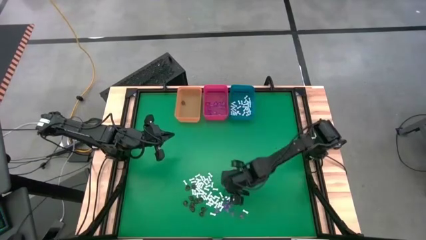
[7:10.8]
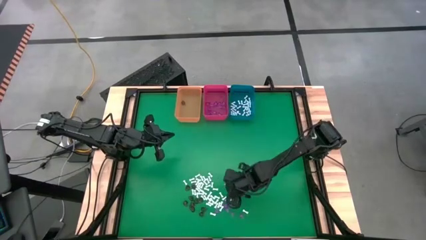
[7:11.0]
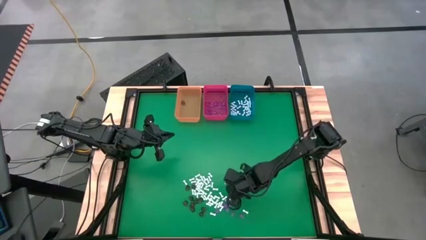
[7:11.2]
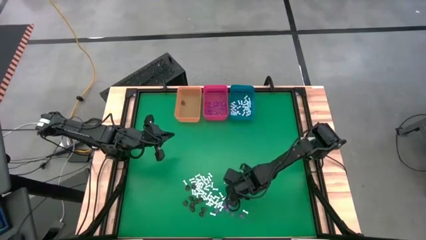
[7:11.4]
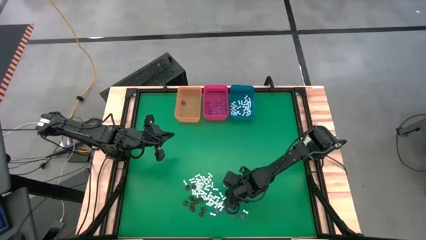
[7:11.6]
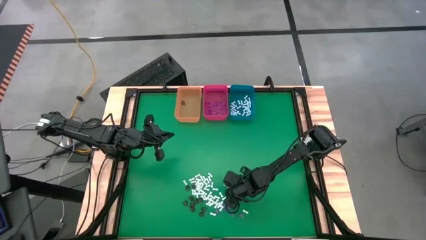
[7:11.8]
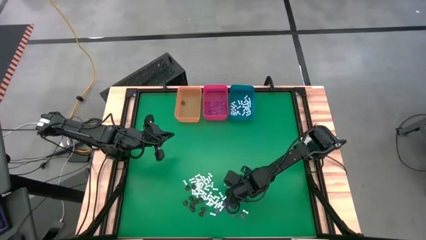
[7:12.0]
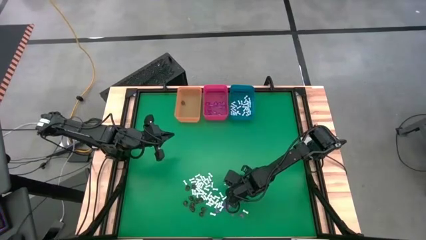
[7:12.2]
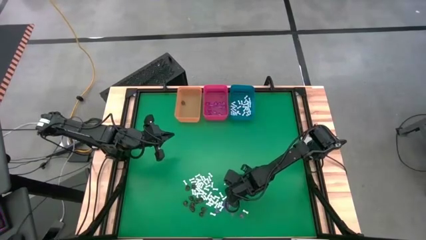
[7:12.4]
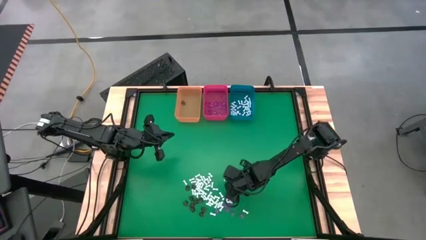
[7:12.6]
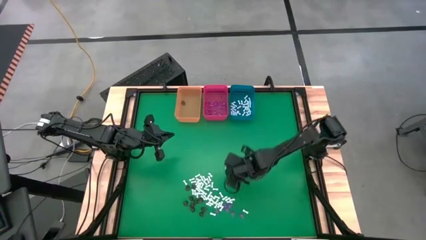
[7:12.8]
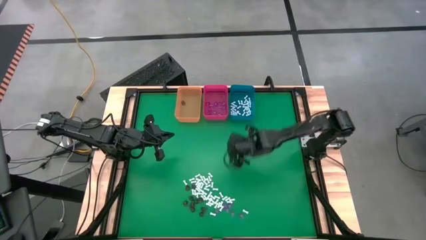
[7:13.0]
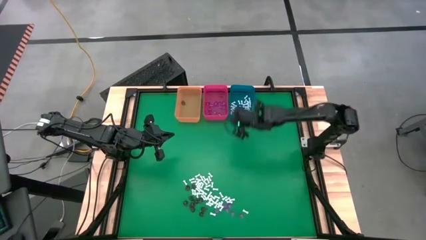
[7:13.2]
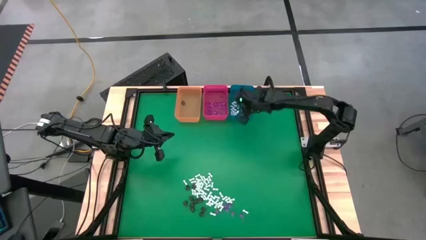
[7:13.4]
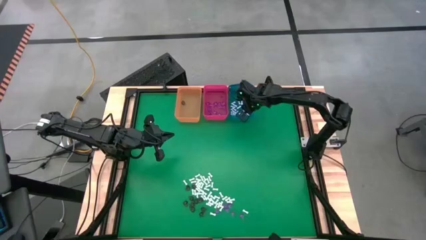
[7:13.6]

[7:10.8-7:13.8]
Task: Sort Halloween decoration
Put the white bone toy into the blue bin

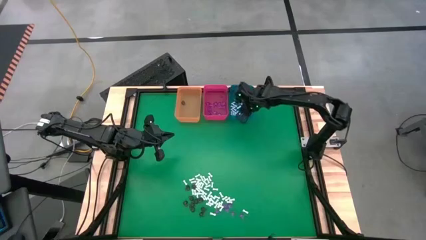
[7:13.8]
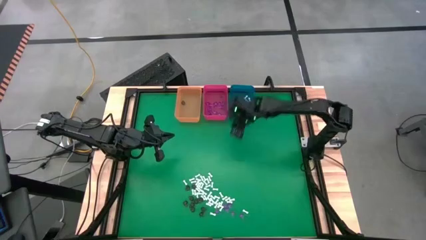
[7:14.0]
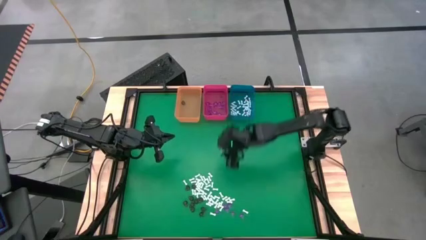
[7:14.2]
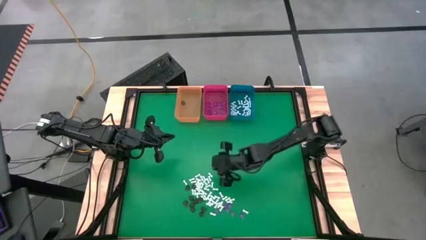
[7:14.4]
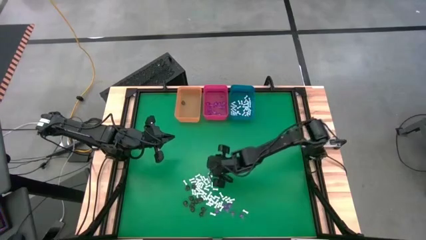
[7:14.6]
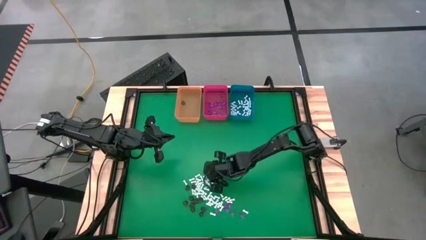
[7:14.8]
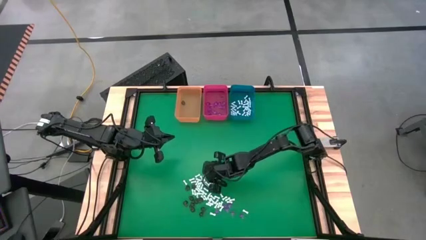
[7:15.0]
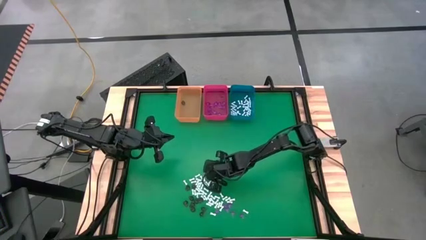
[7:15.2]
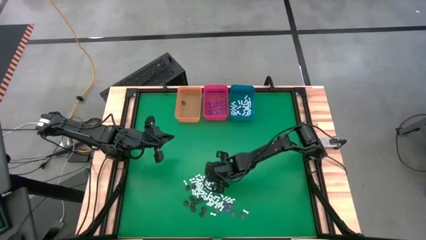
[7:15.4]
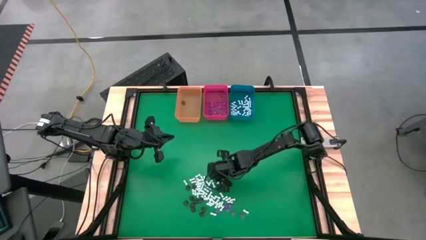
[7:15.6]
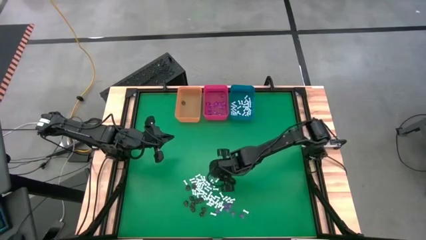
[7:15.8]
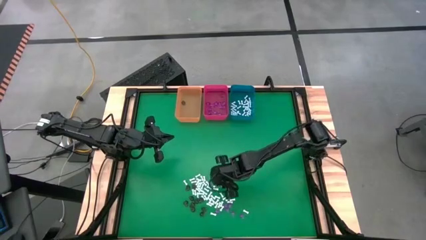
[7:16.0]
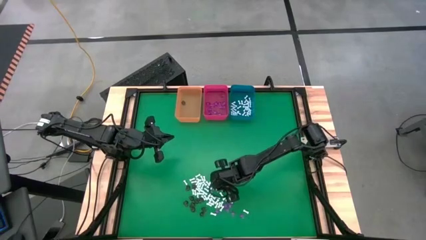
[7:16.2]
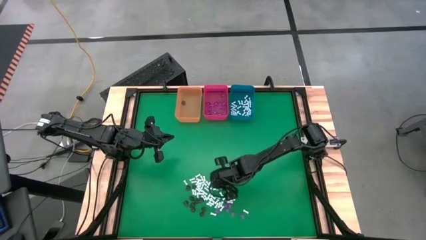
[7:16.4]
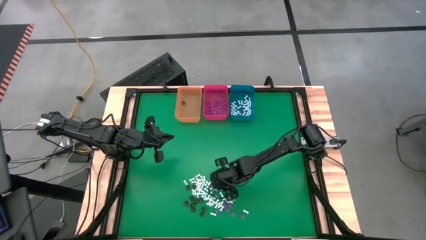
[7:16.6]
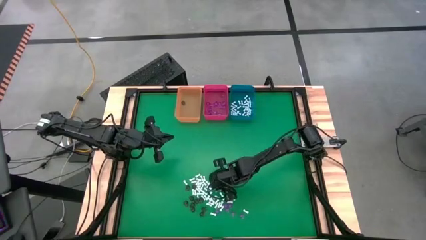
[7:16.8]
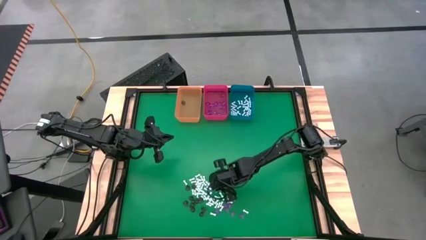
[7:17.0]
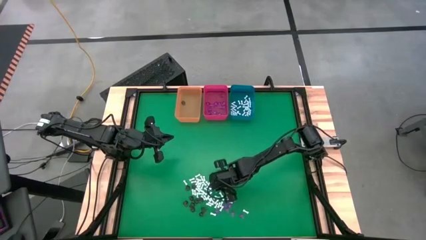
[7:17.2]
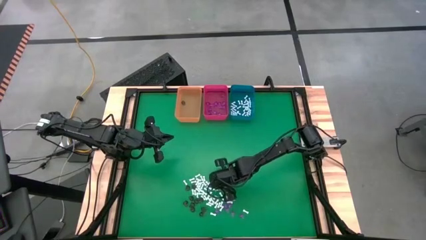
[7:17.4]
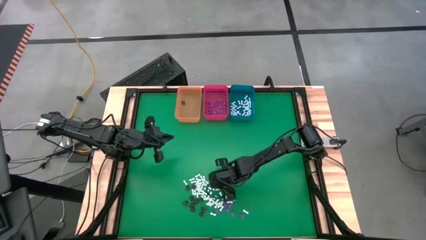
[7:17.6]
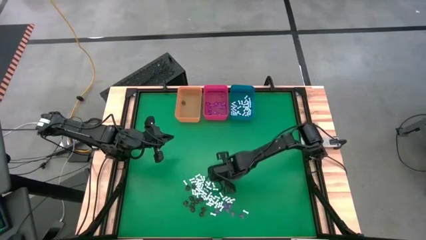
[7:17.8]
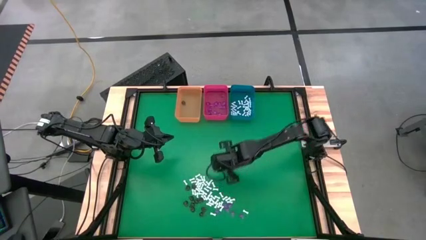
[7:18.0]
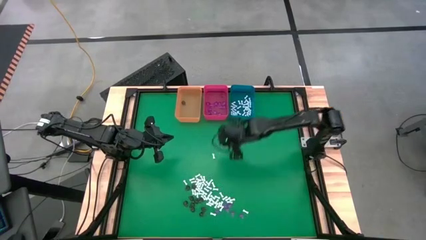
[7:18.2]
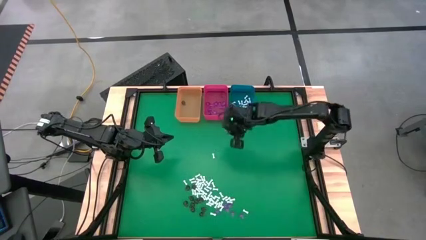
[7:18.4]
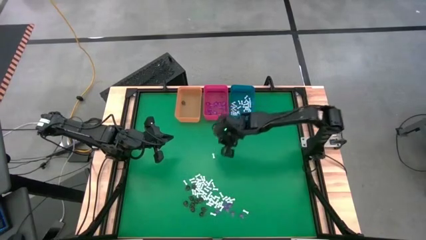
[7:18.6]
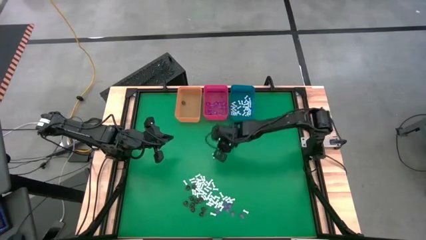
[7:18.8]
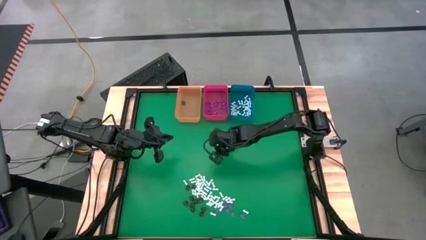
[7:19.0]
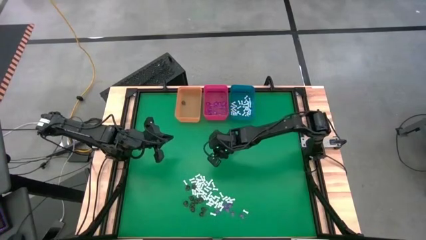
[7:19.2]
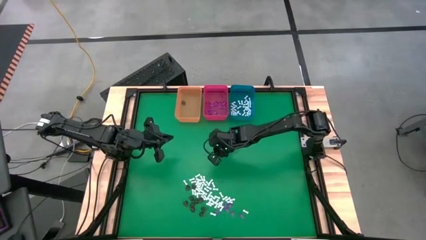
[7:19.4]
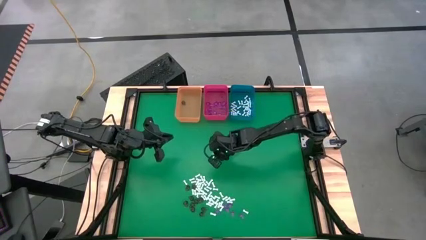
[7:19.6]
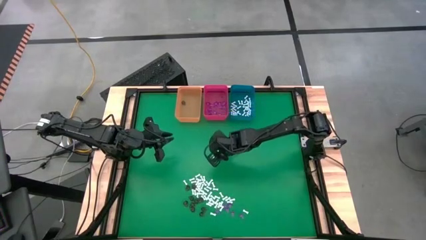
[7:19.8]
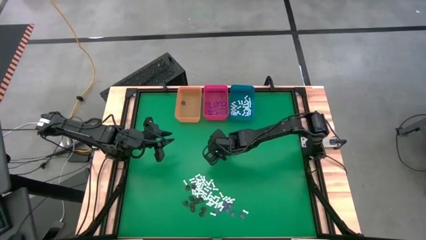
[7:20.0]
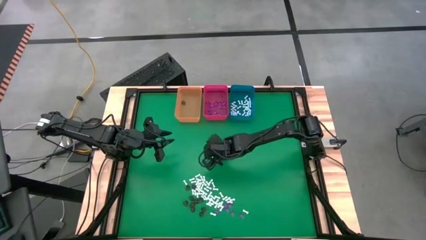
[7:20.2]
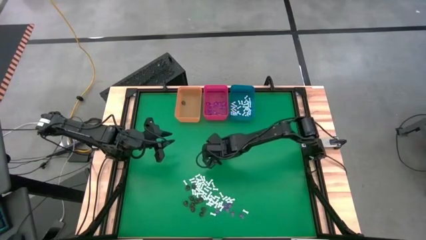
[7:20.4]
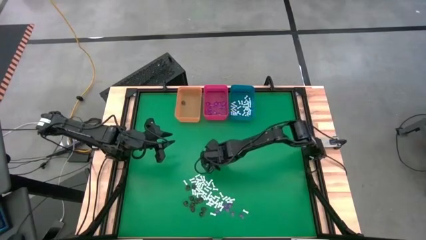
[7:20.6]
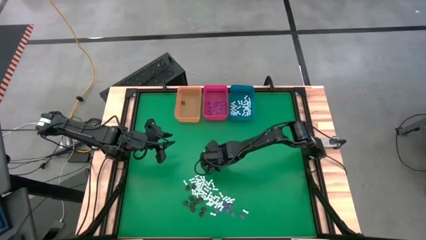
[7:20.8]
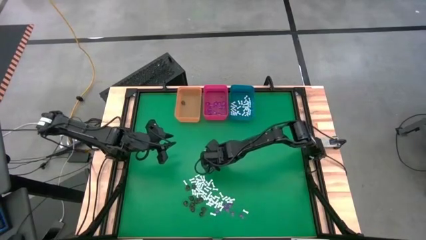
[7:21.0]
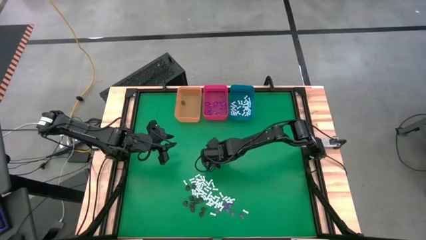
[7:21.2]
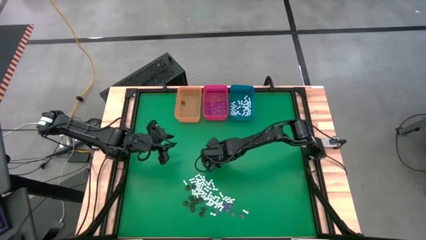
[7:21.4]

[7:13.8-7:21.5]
Put the white bone toy into the blue bin

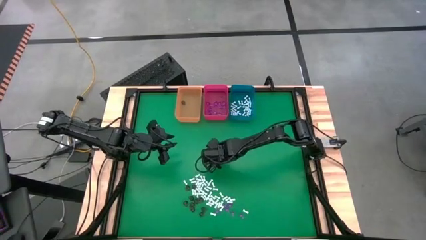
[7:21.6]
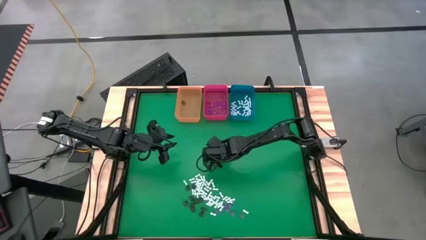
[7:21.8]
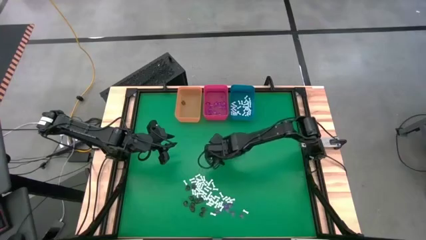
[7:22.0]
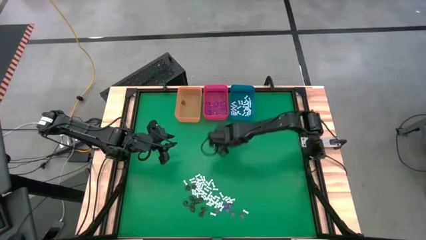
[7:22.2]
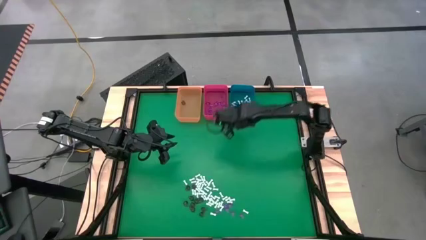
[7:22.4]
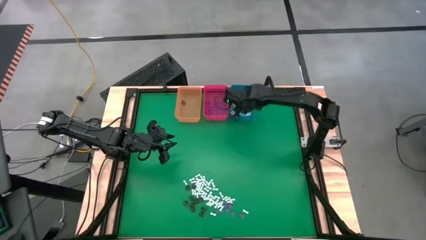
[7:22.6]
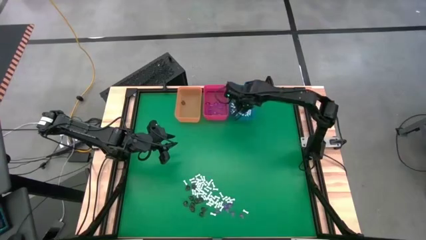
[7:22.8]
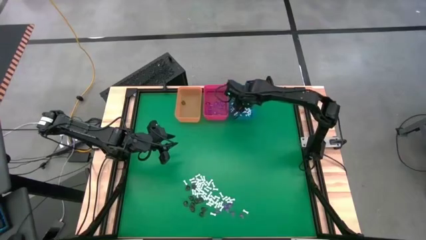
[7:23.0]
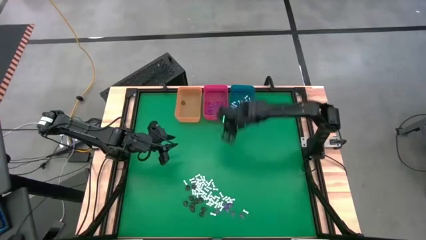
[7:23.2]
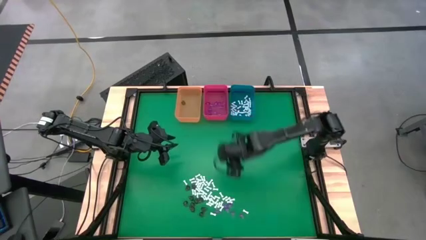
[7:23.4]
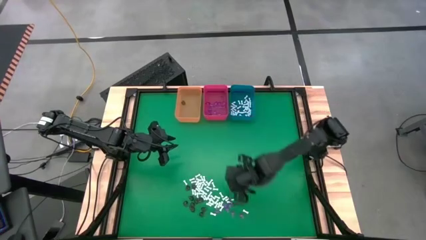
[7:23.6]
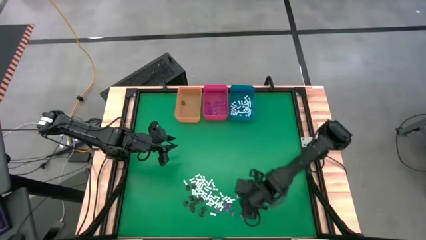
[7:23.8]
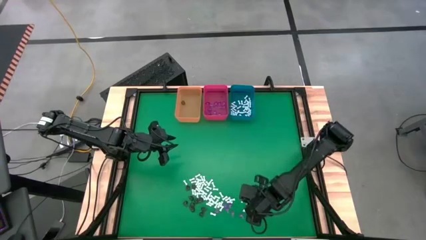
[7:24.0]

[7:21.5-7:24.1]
Put the white bone toy into the blue bin

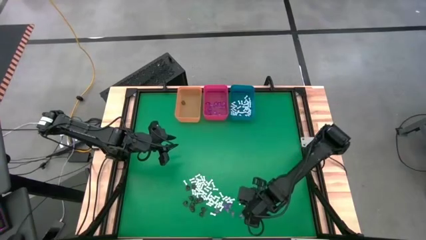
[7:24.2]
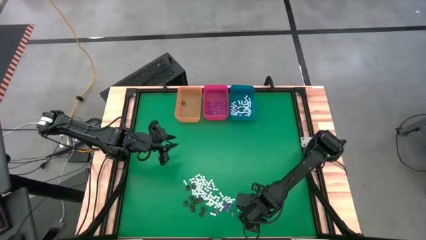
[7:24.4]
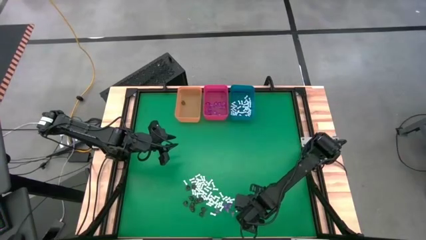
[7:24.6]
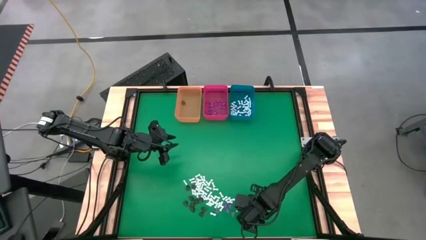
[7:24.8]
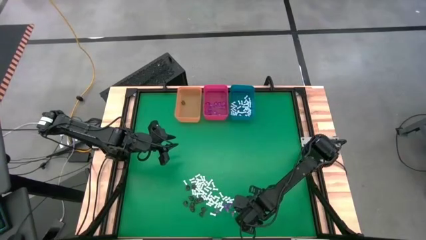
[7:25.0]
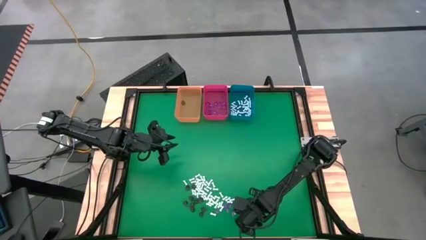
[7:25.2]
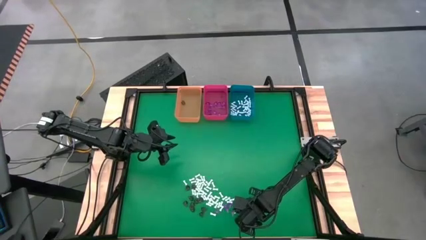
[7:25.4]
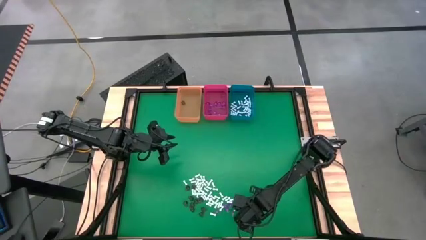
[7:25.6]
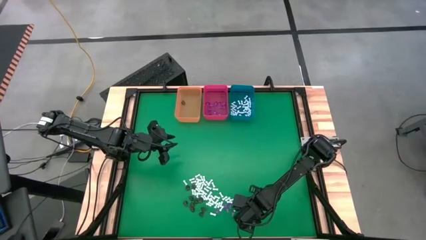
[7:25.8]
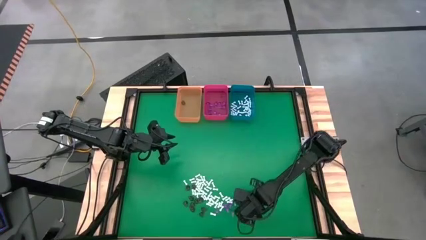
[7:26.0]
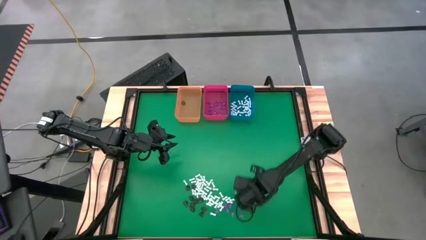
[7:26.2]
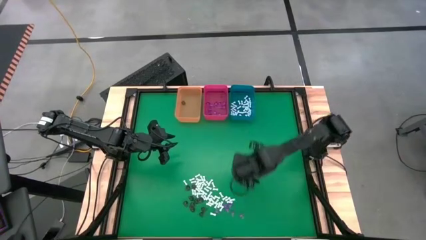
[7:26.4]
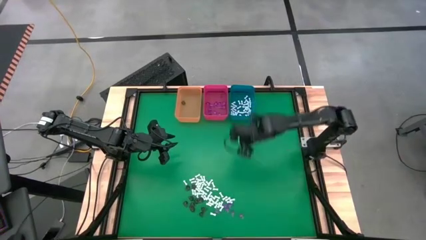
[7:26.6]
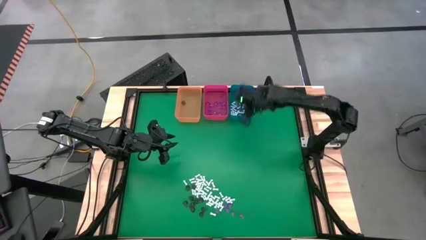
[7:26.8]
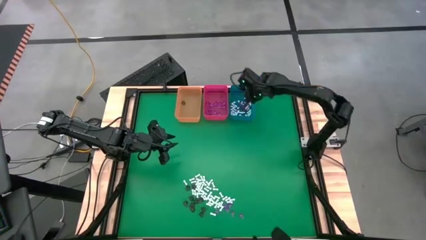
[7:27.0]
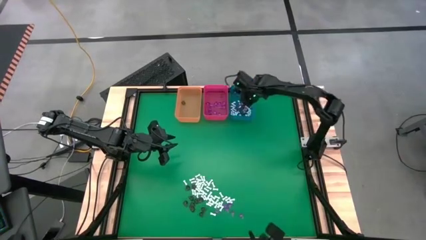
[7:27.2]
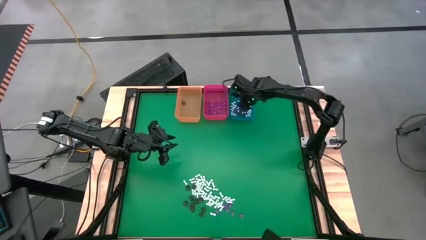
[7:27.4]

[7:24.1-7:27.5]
Put the white bone toy into the blue bin
